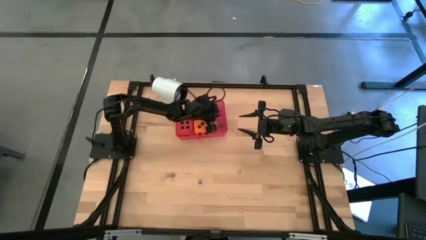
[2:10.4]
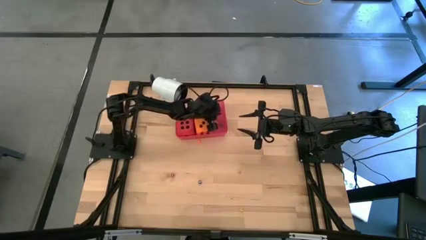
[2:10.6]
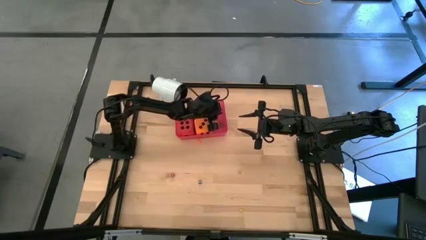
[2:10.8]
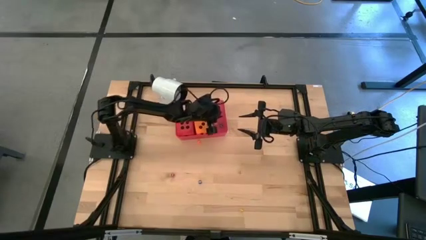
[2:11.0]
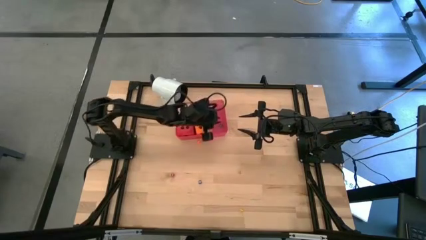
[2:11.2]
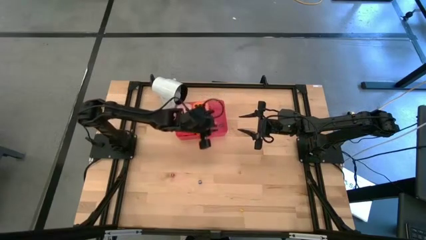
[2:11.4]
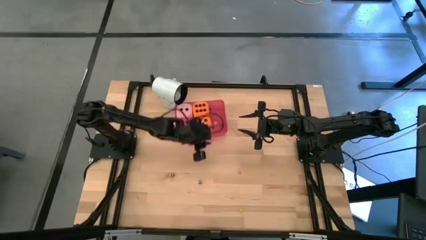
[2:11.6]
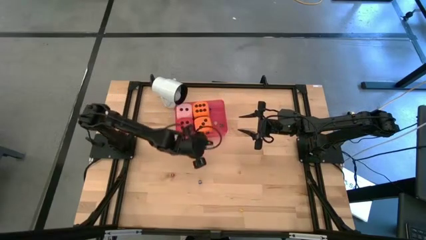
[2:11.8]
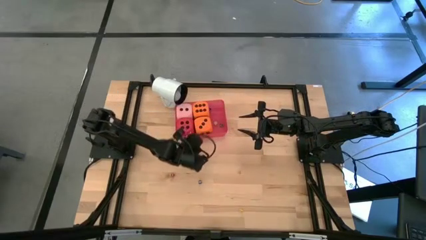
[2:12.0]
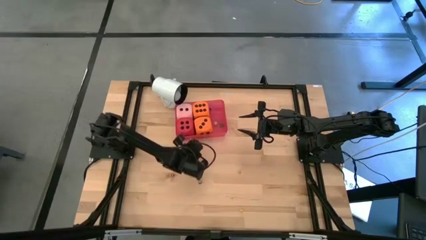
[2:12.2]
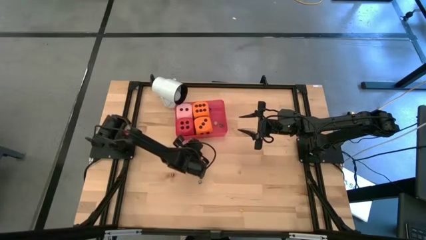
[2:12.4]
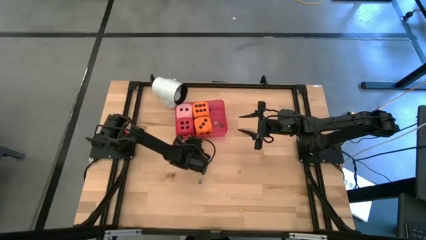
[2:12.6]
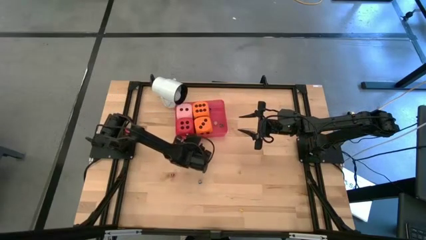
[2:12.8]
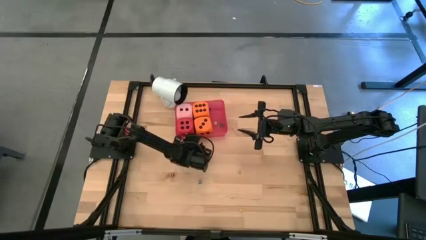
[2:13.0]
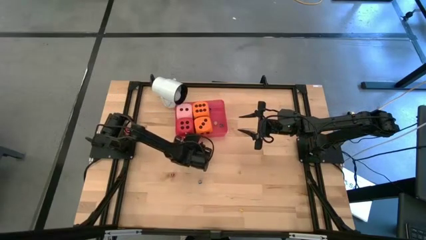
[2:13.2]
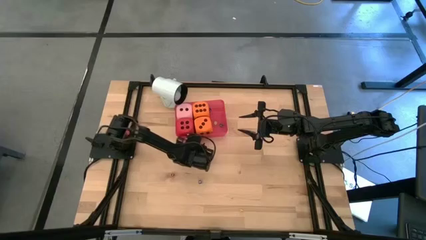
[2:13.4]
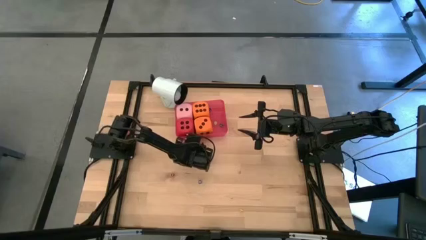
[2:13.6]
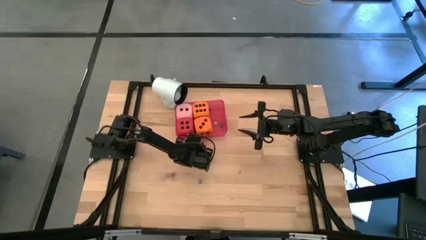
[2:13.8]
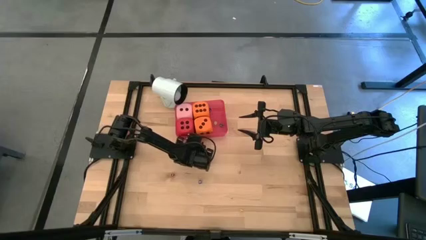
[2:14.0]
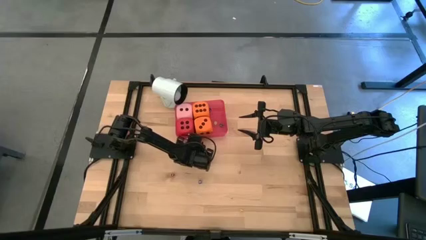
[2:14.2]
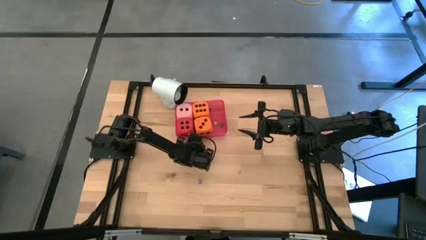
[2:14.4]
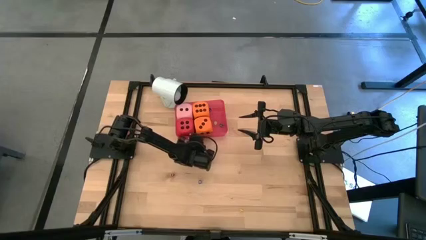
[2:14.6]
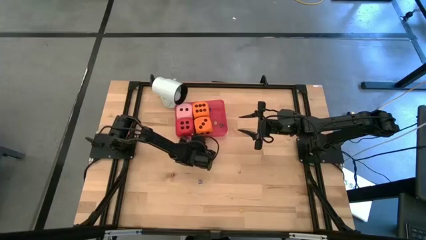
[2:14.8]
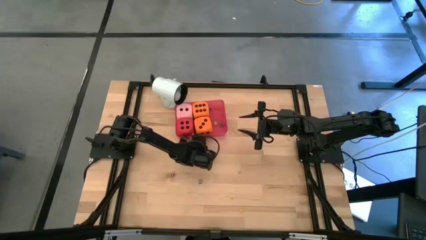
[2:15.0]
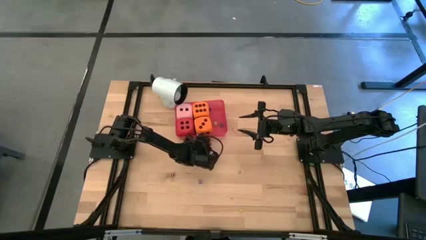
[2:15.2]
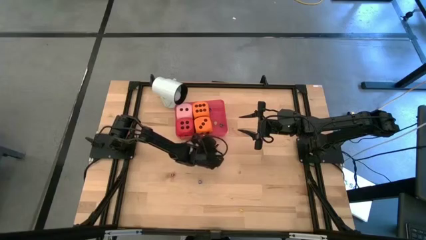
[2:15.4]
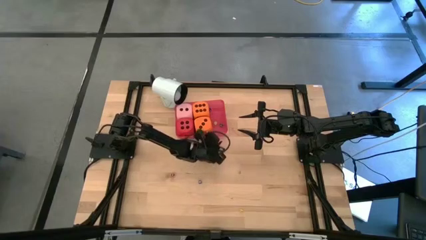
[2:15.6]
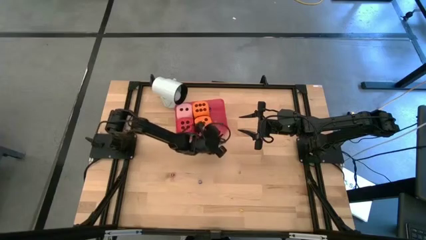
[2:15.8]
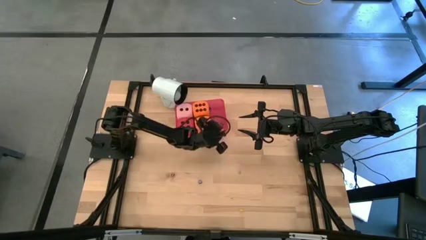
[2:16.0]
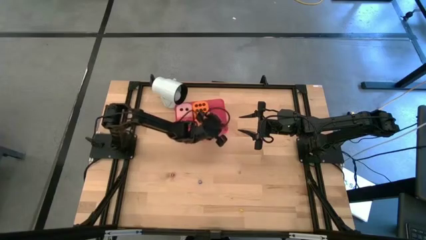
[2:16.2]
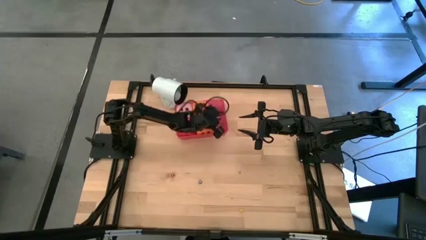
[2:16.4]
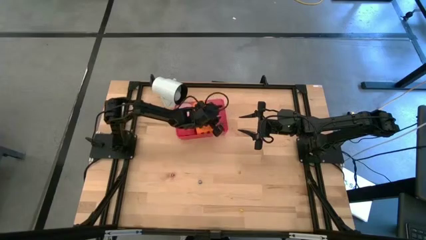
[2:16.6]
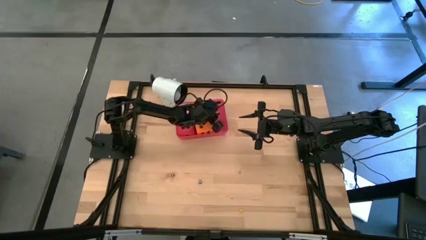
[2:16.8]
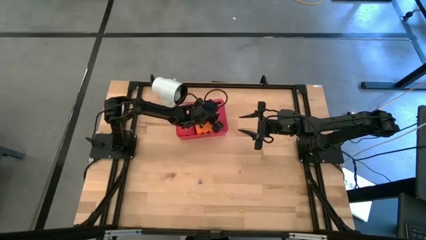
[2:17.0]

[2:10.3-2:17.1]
Task: Pick & Place Dice
Put the small orange dice into the red bin

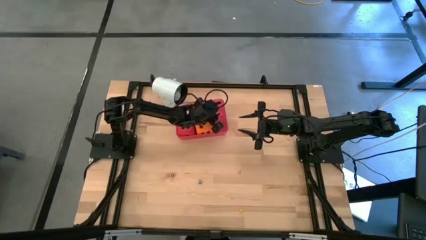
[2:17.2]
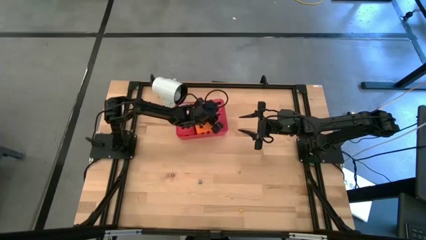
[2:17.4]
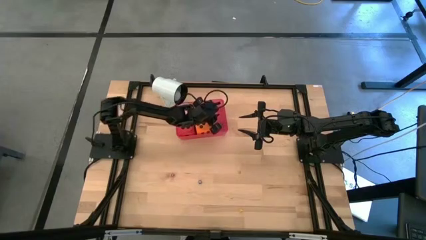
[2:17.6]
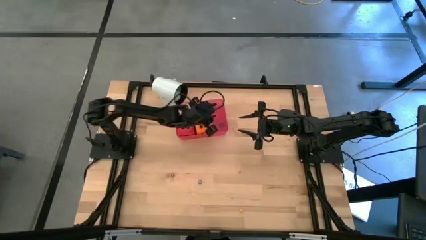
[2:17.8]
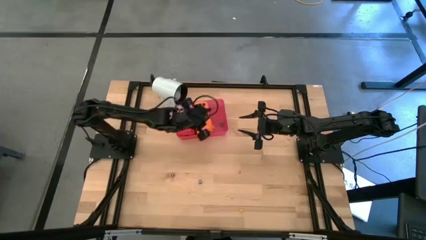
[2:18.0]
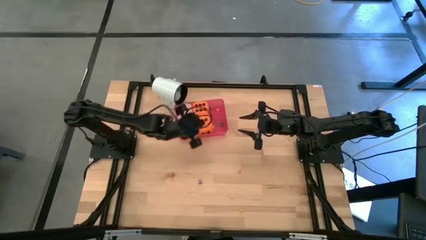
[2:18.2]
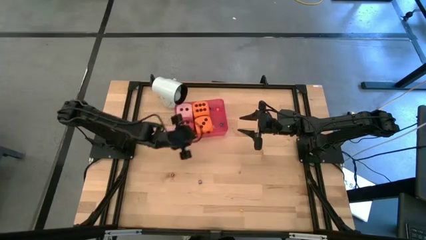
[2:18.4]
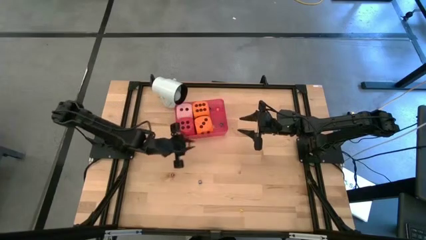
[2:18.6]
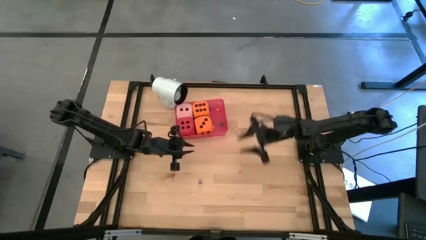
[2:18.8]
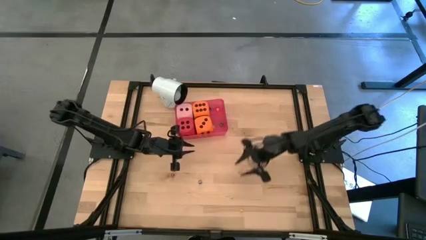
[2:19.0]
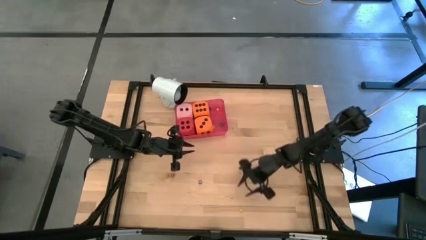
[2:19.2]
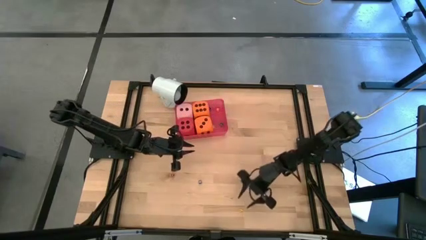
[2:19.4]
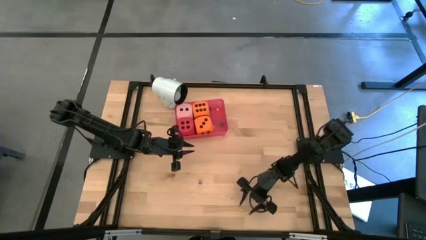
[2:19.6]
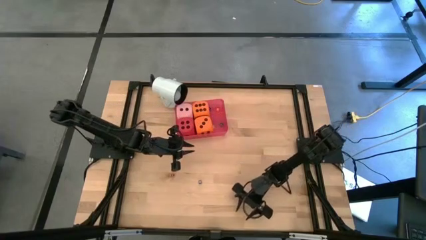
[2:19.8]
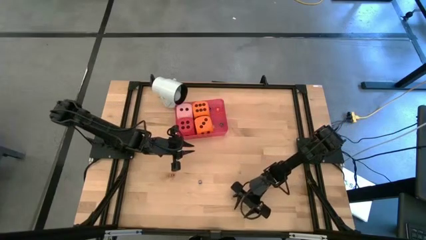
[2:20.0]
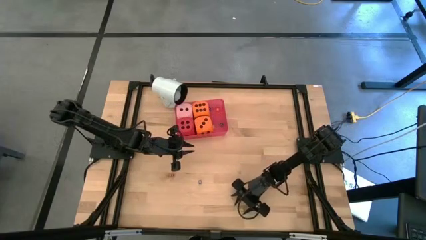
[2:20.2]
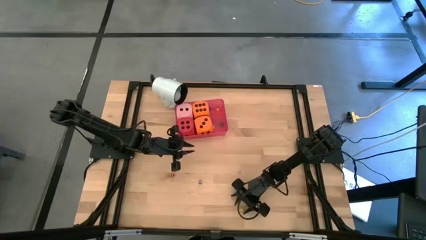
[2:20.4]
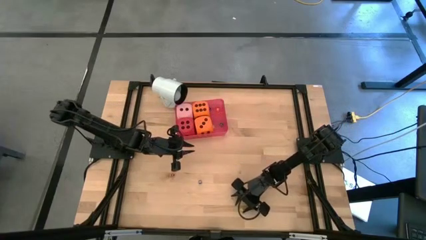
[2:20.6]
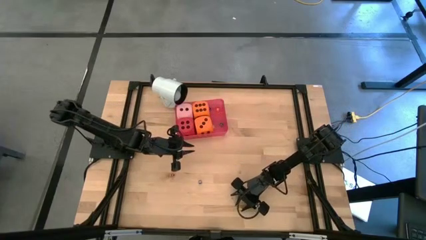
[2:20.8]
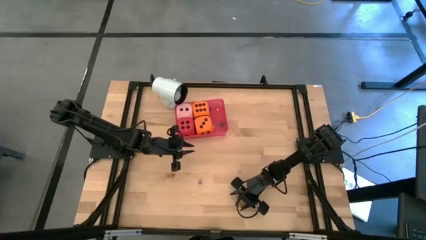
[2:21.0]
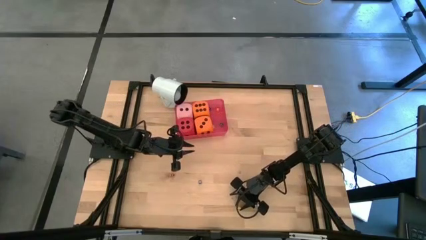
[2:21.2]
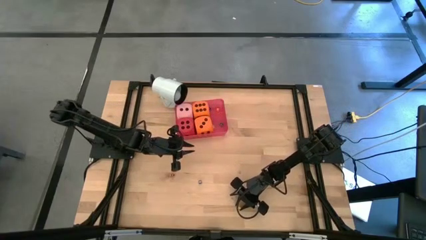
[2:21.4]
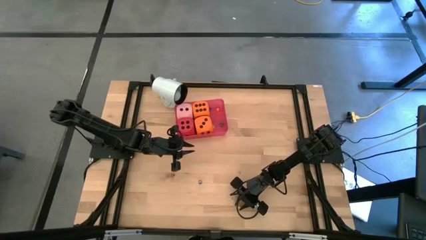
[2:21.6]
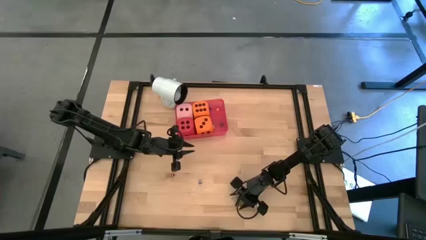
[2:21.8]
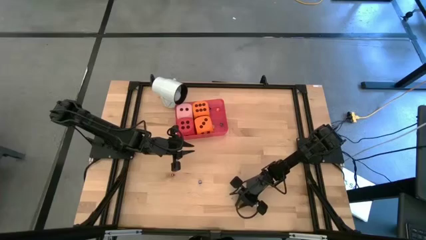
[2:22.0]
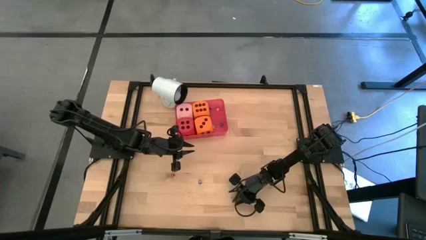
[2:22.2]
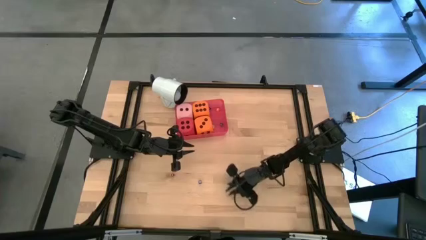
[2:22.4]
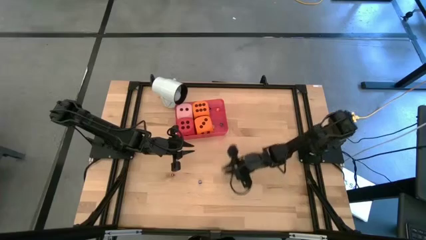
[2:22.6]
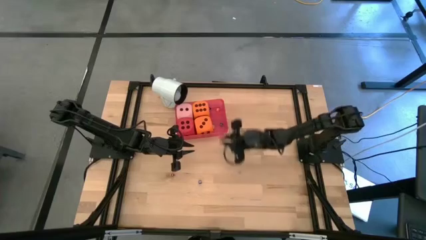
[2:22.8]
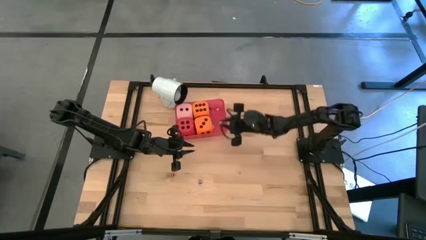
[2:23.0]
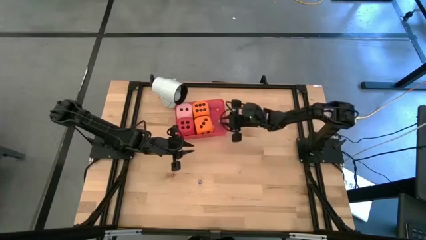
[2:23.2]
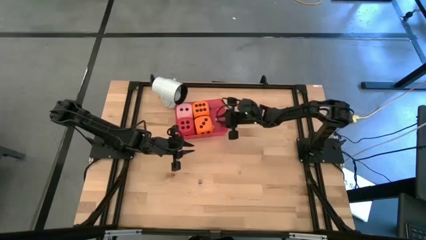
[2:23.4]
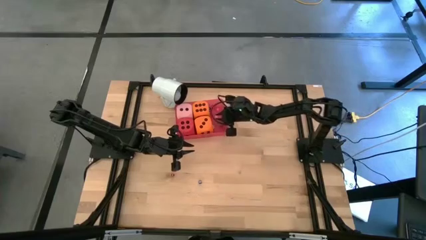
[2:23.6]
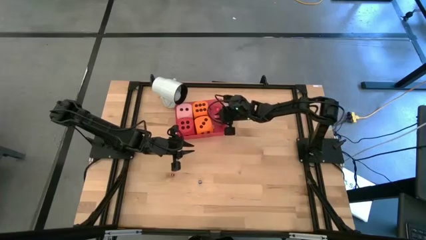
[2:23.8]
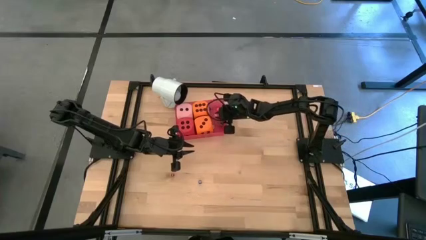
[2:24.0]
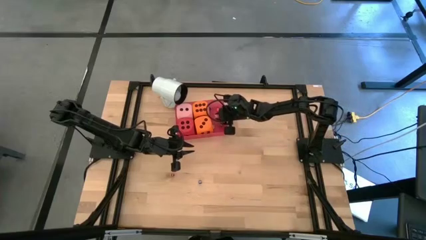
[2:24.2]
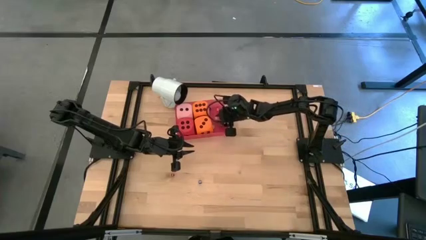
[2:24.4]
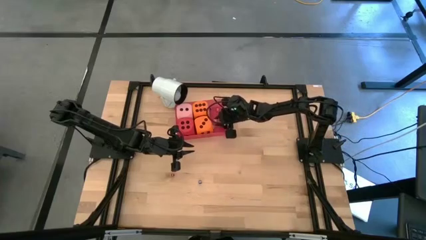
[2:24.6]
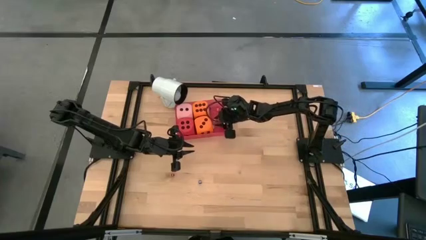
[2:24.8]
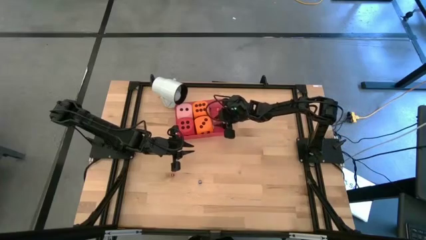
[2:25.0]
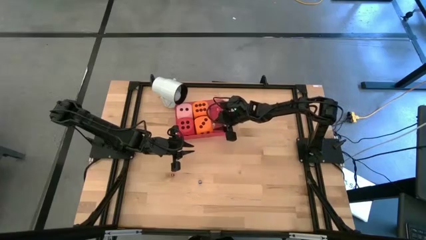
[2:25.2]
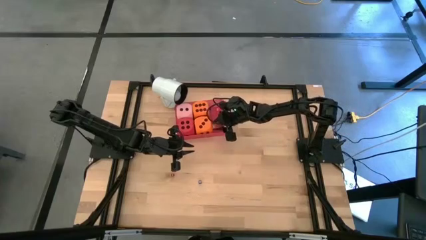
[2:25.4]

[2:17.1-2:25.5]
Put the small yellow dice into the red bin
